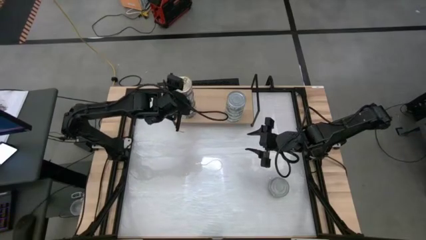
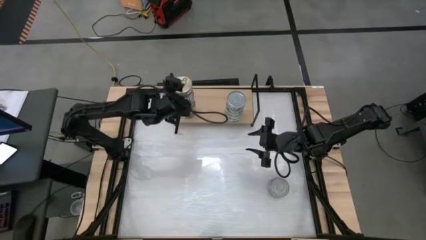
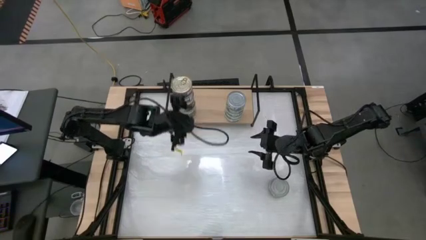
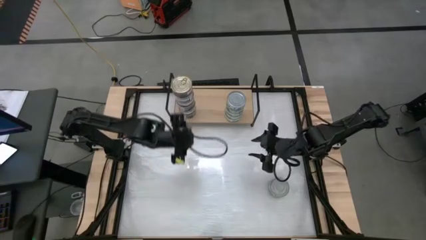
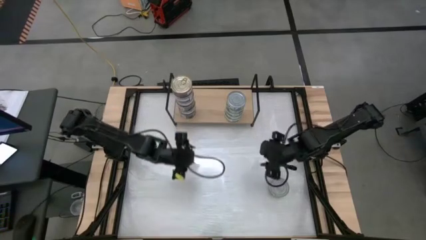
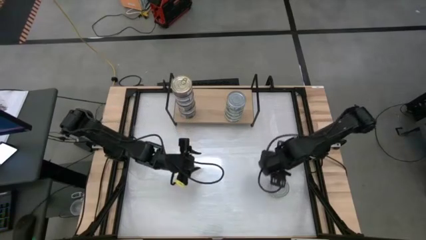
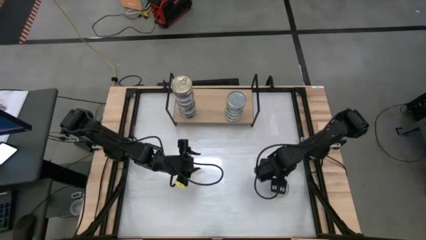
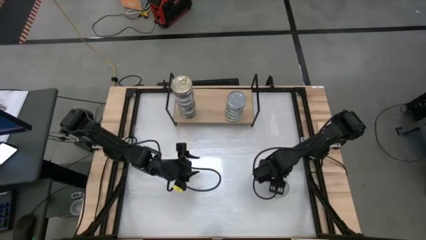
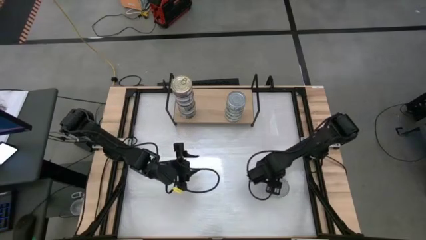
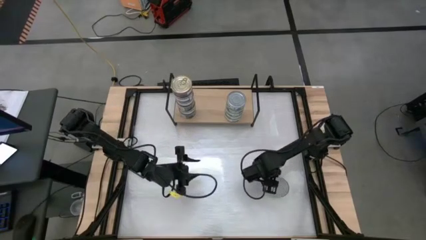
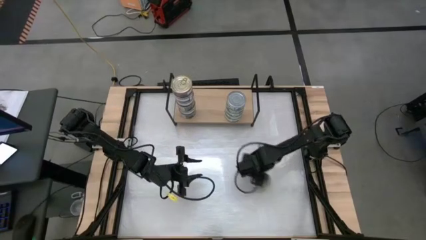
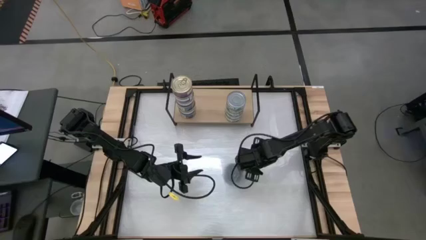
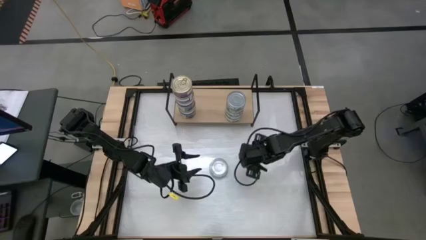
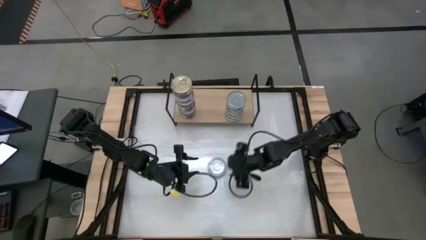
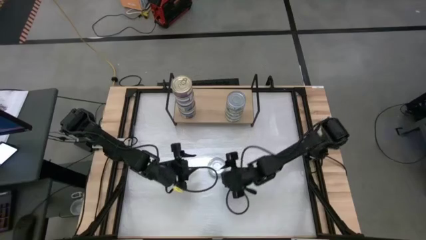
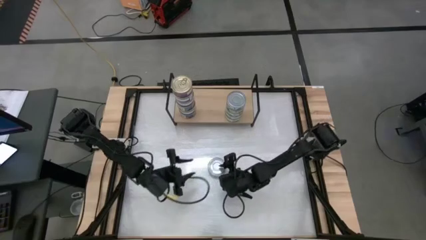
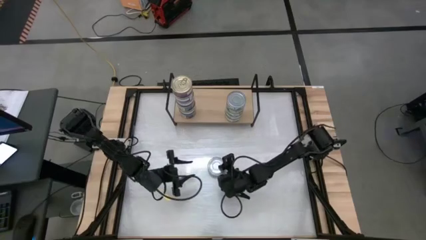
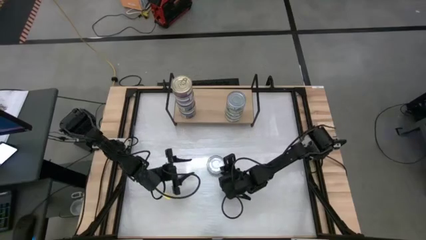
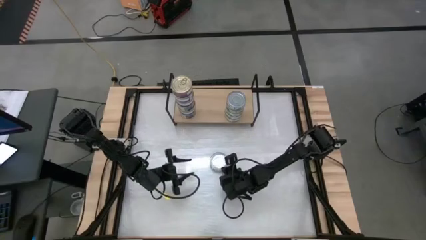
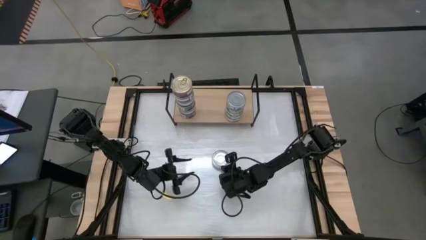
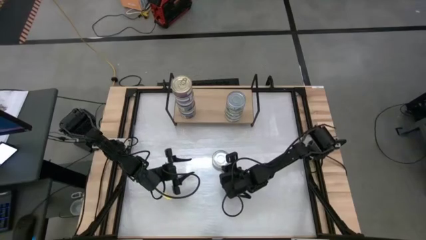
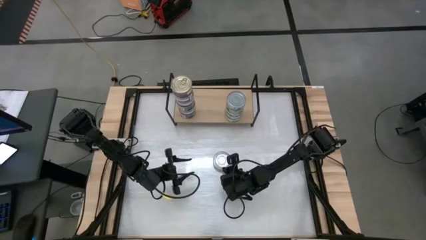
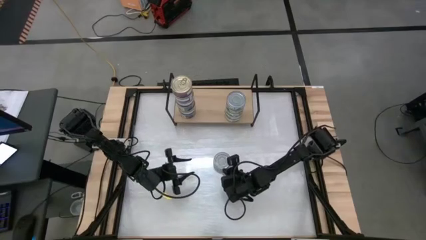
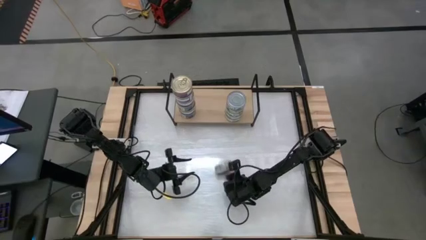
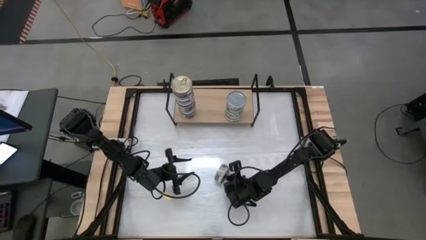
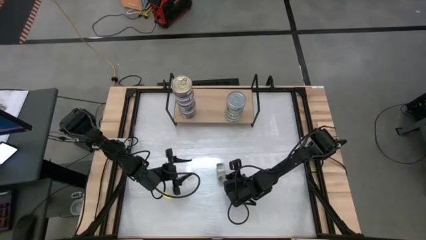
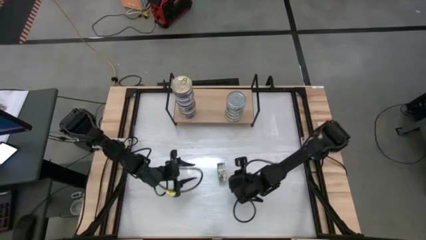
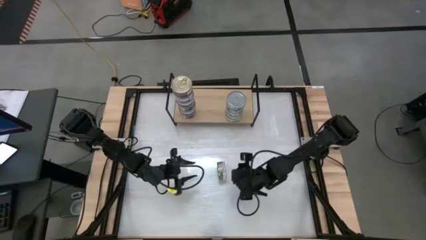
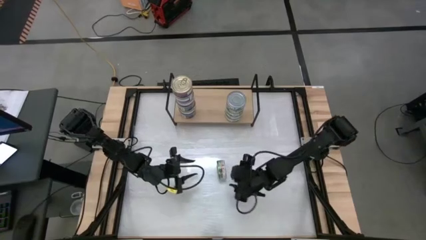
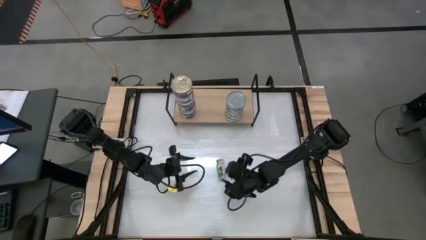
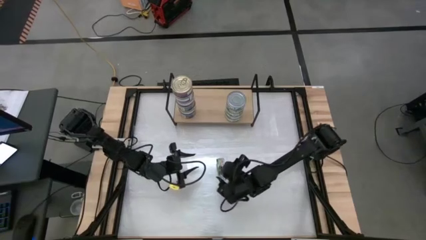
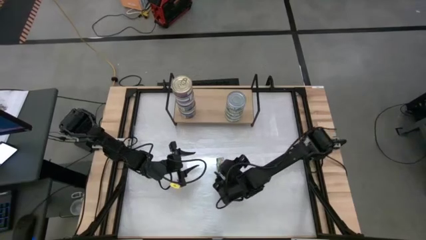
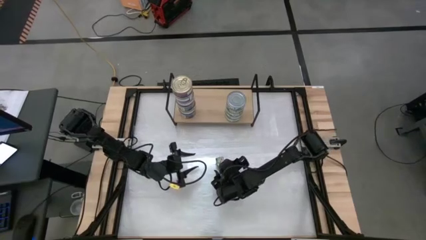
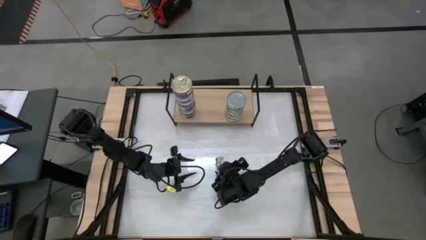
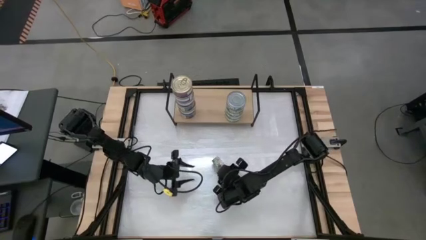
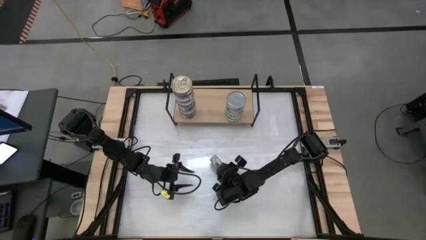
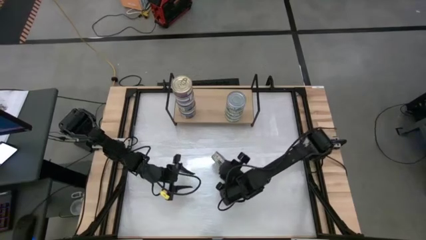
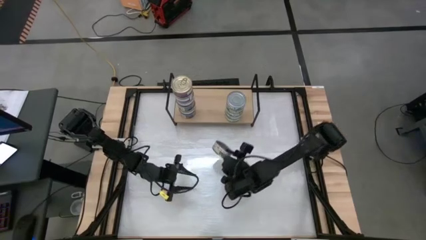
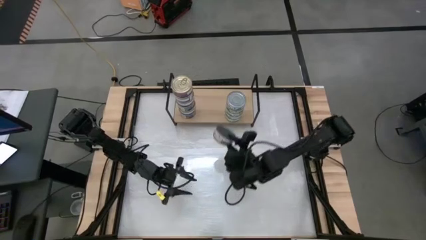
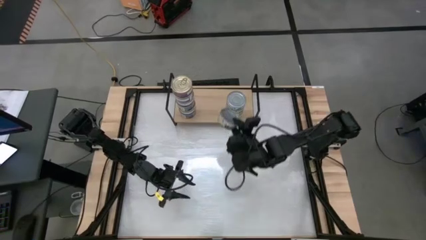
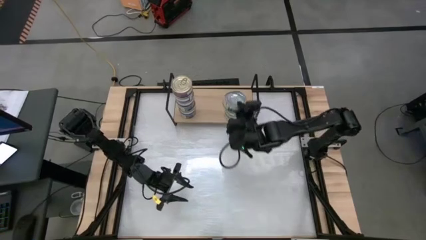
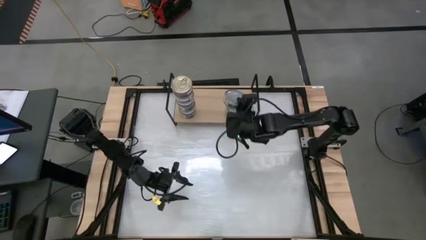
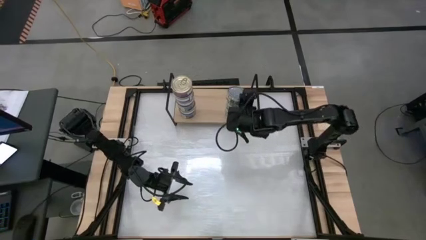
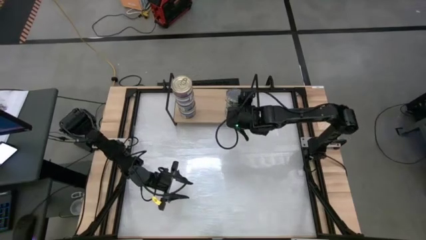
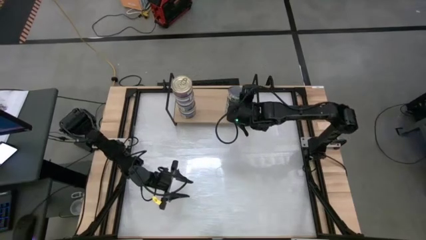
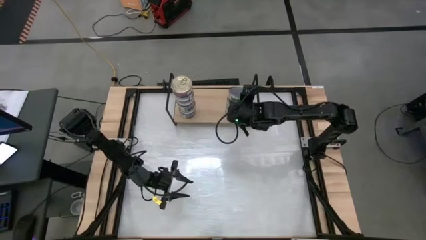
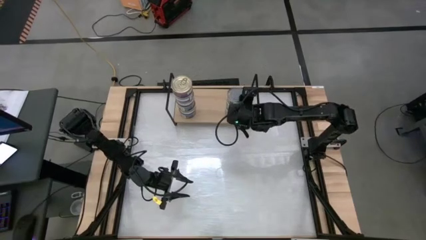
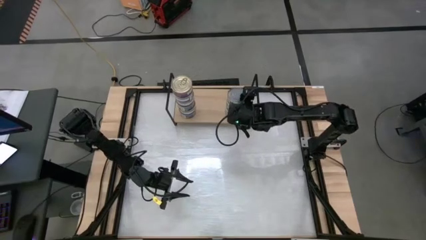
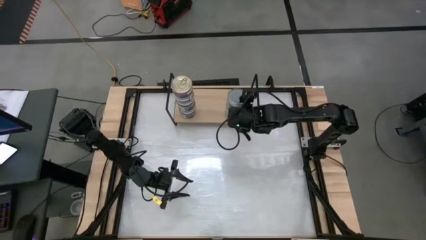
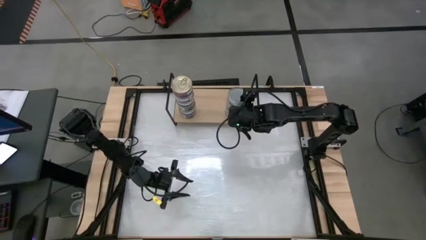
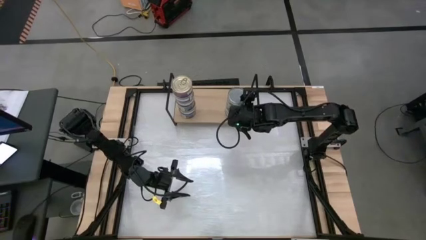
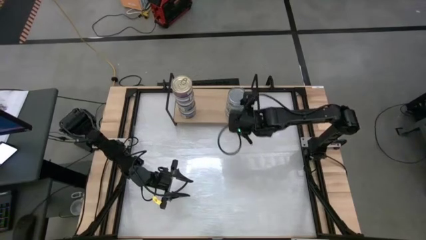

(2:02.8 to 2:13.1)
Task: Stack canned seafood by type on shelf
Stack the green tuna can on top of the green tuna can on the shelf

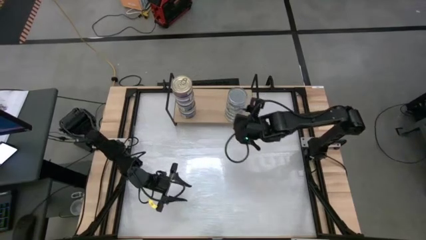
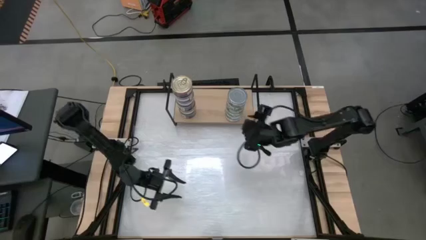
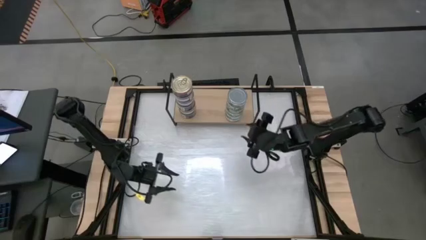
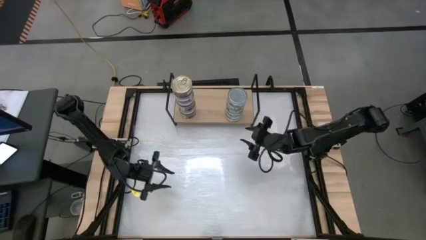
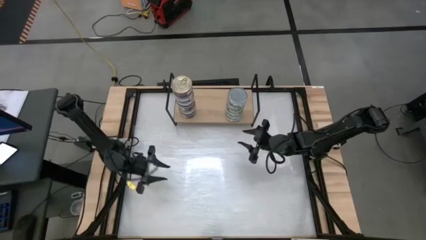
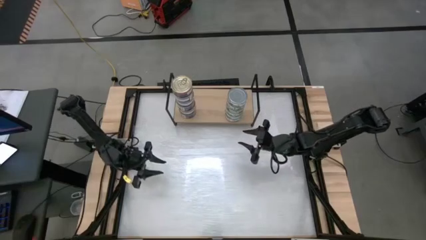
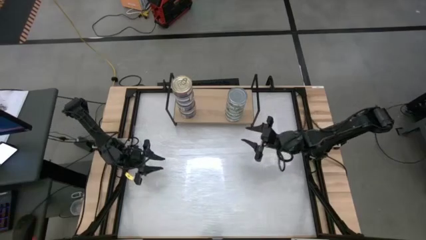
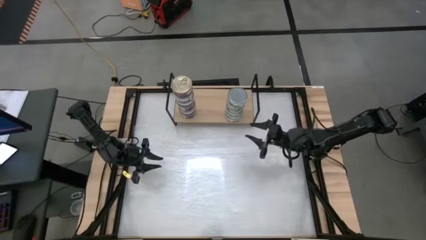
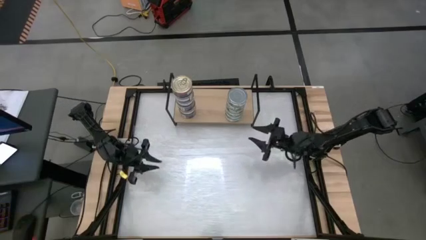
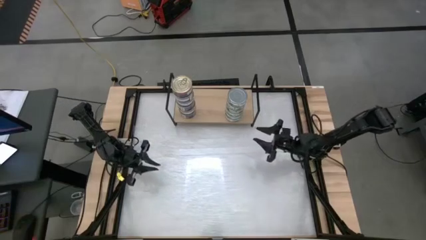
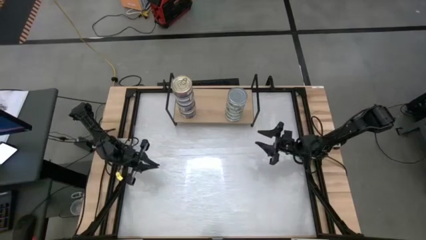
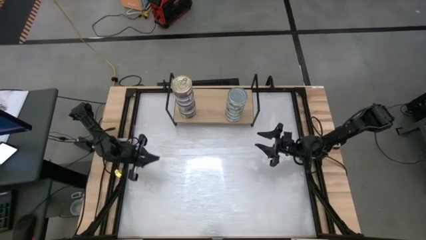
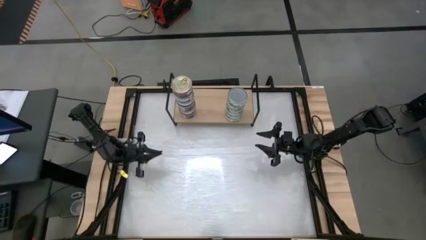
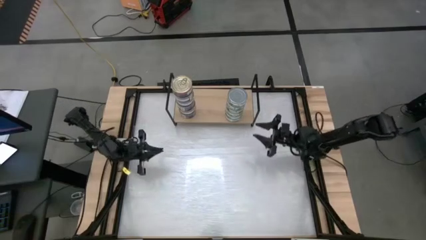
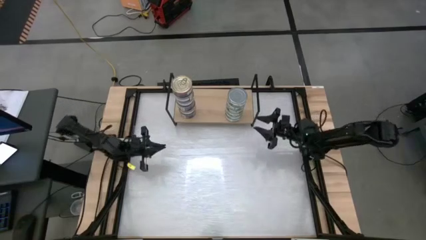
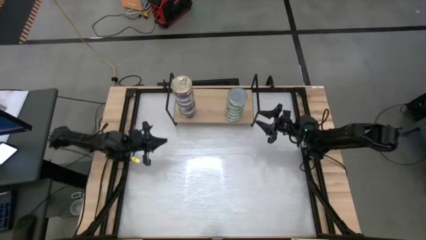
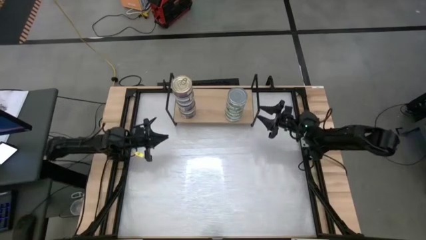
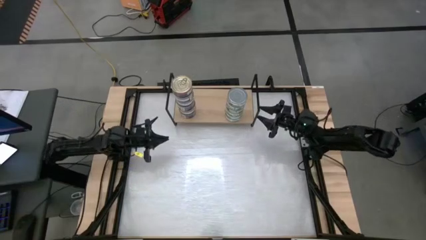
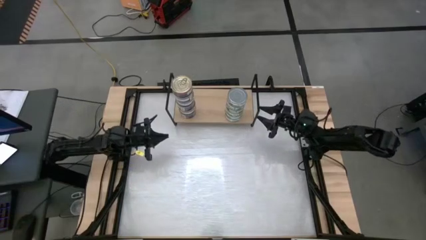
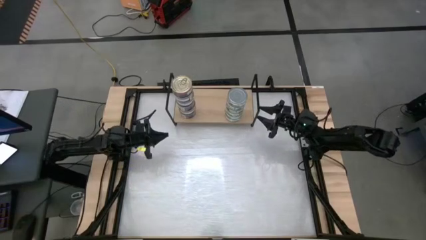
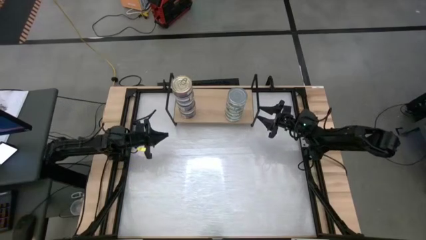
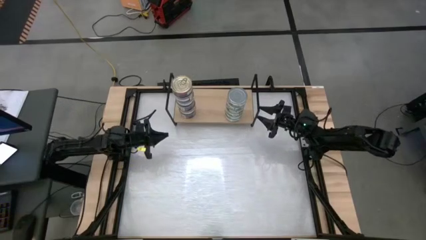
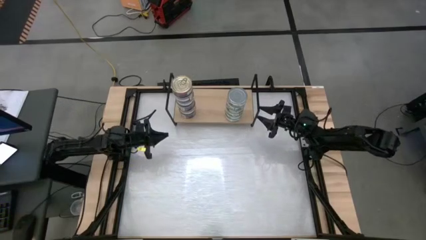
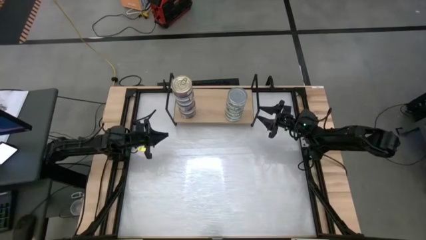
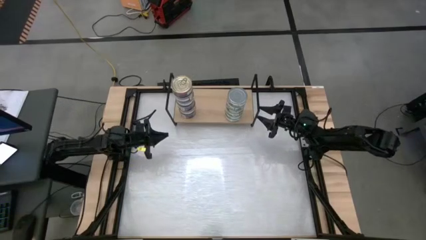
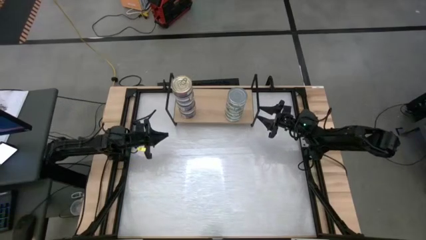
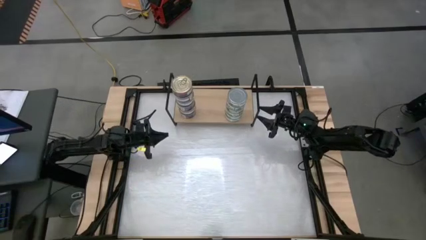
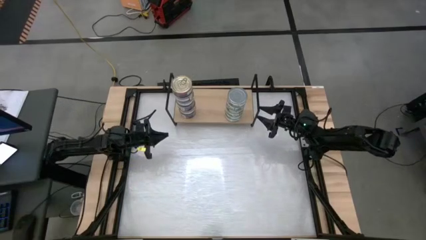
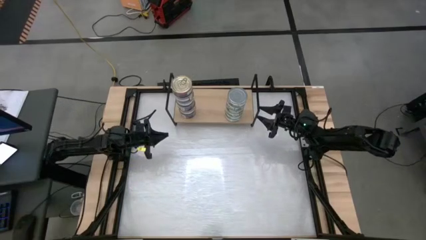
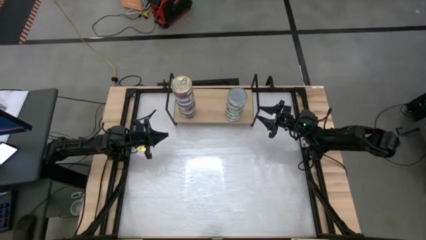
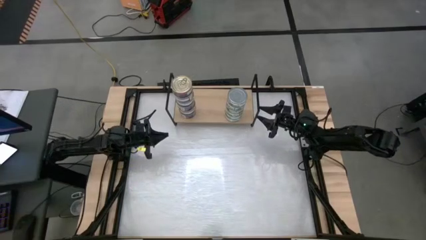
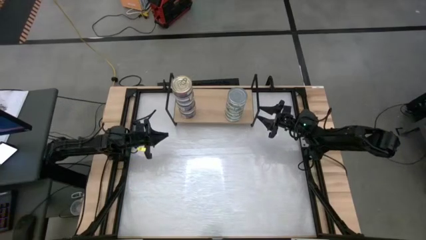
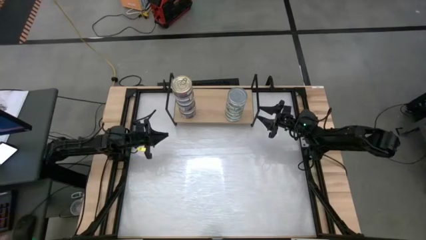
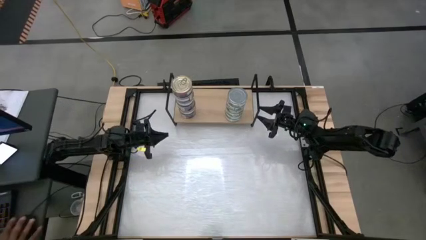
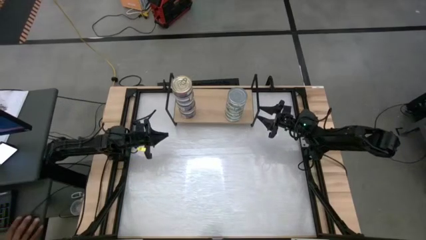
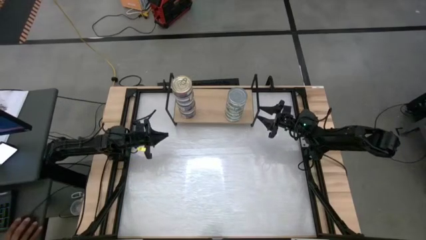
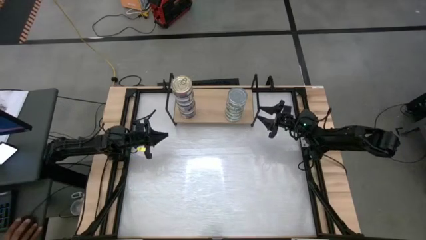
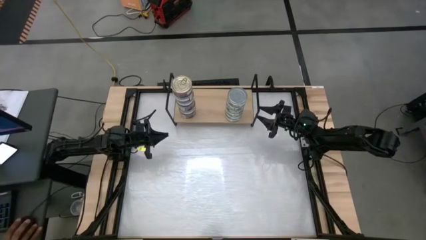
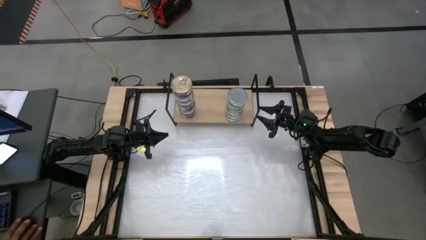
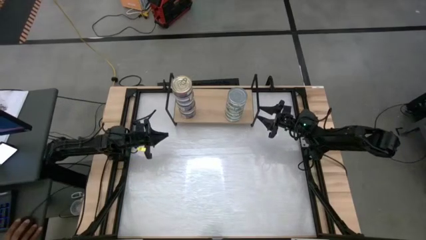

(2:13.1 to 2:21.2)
Return to Home Position
